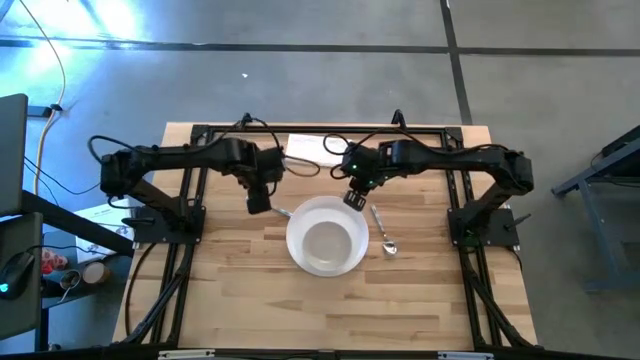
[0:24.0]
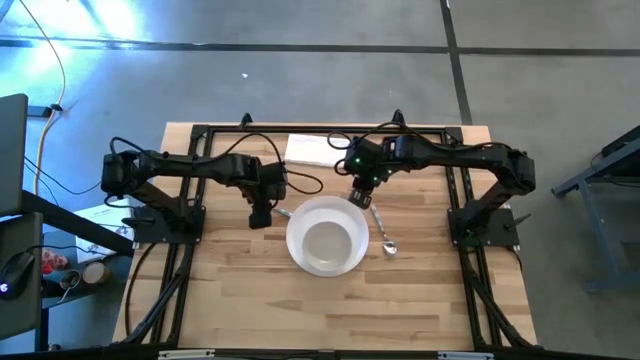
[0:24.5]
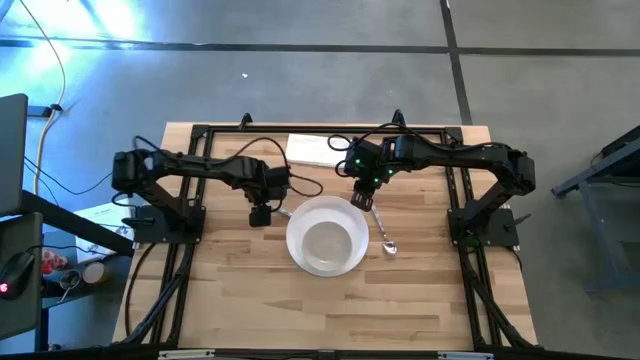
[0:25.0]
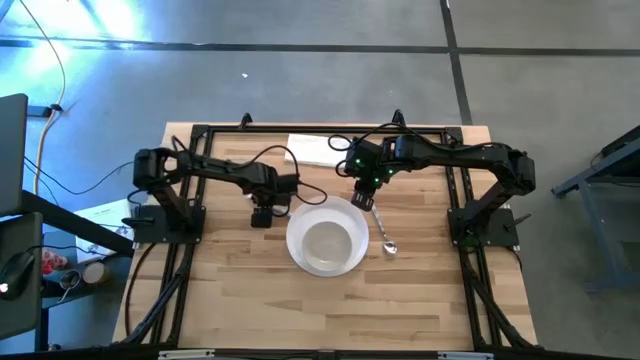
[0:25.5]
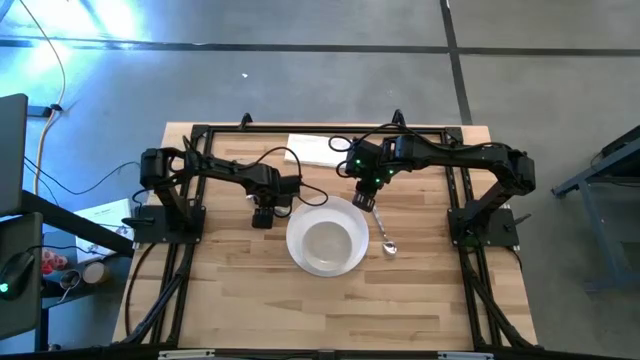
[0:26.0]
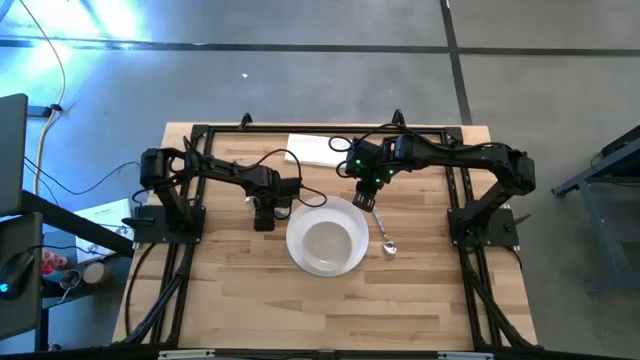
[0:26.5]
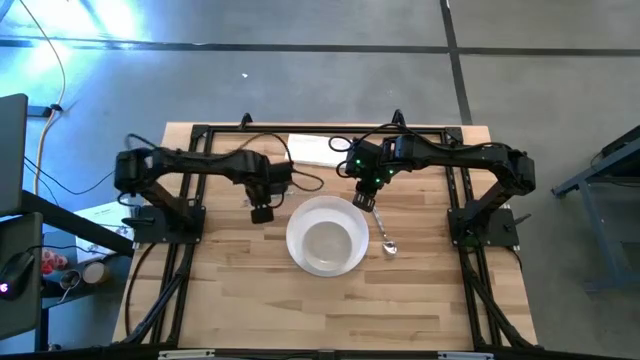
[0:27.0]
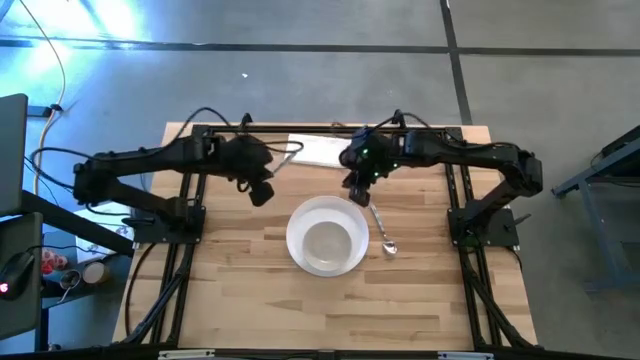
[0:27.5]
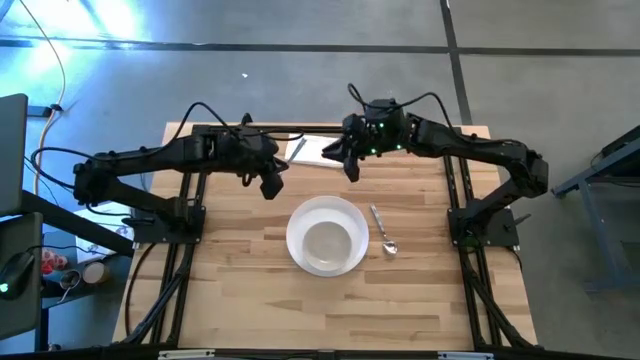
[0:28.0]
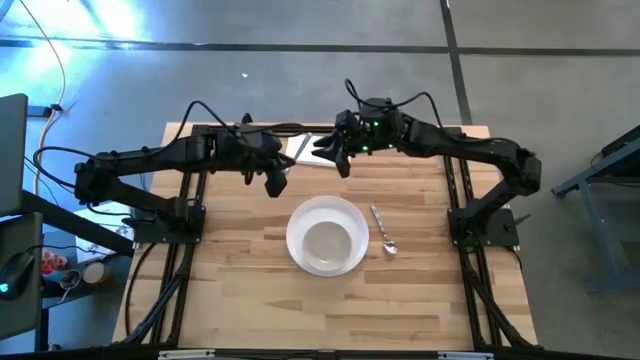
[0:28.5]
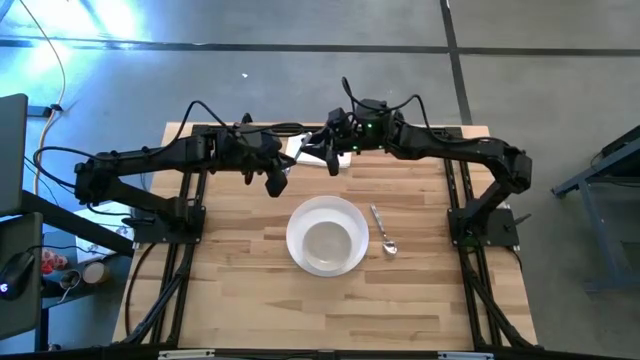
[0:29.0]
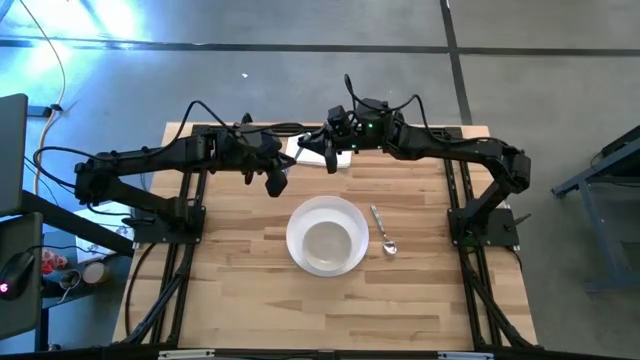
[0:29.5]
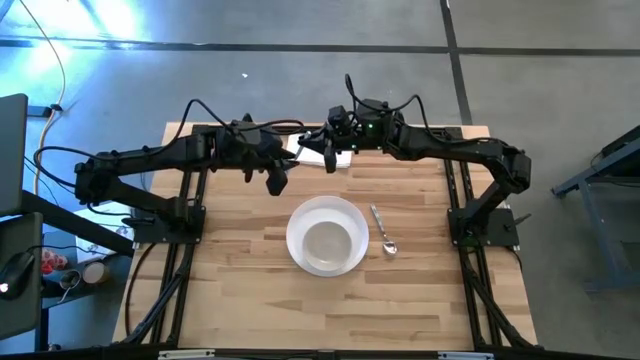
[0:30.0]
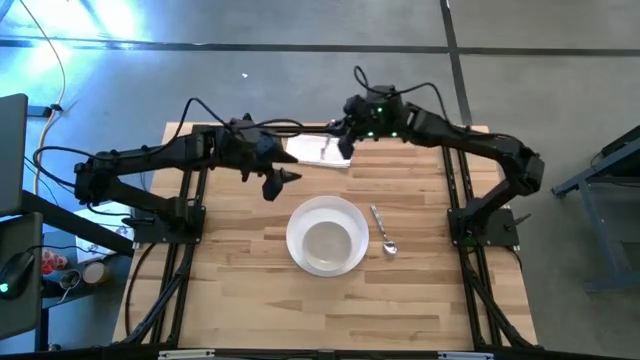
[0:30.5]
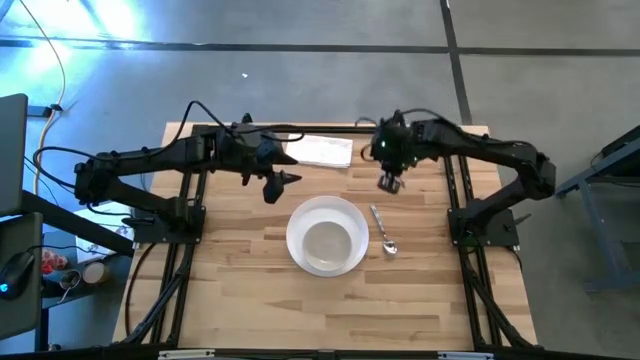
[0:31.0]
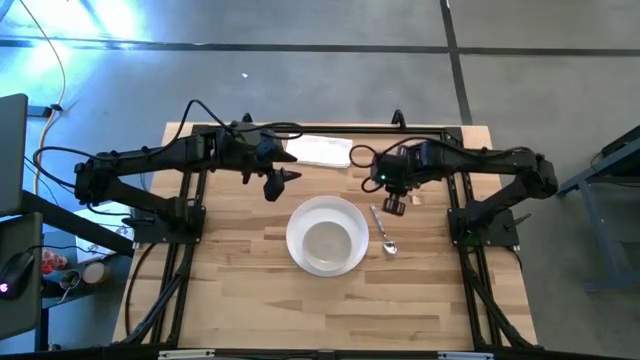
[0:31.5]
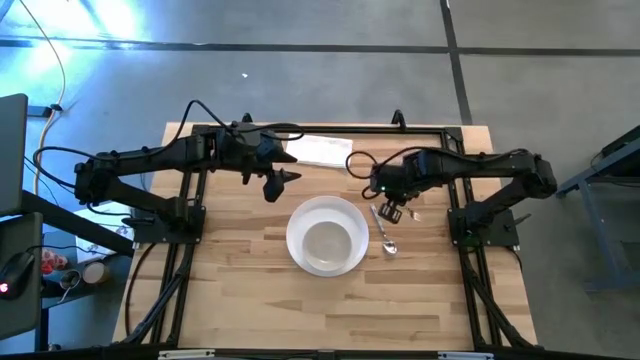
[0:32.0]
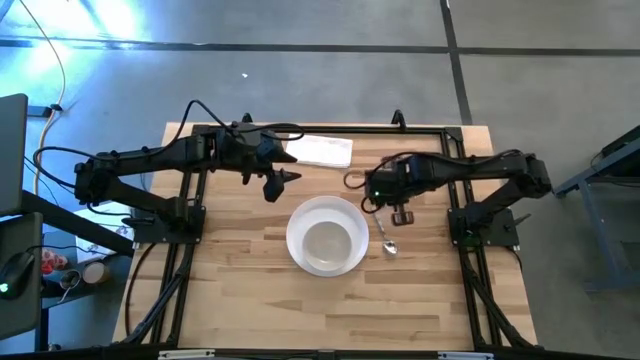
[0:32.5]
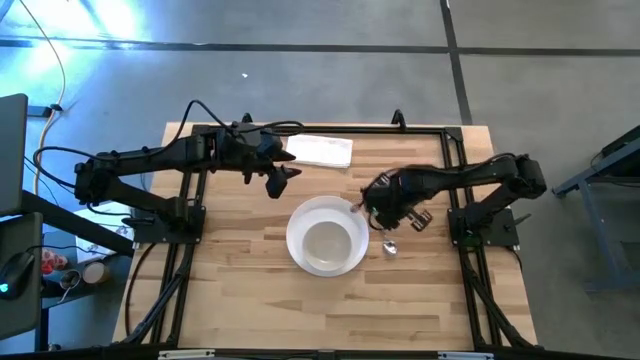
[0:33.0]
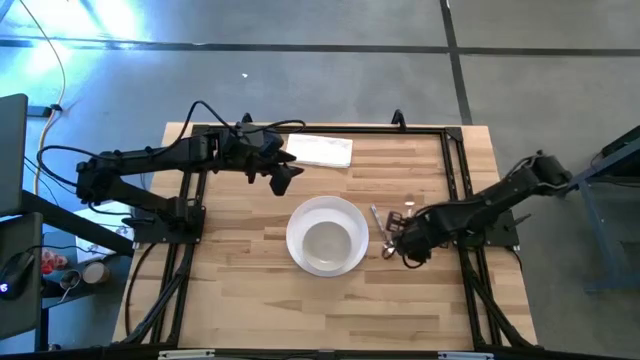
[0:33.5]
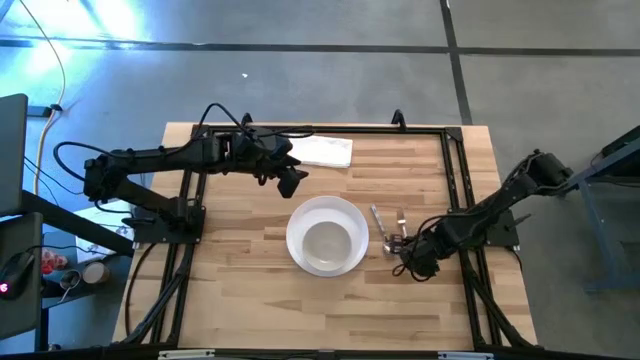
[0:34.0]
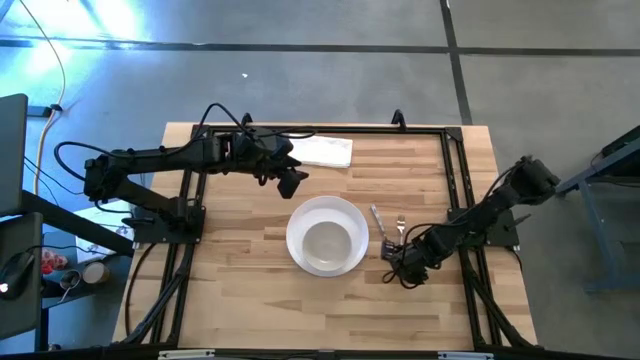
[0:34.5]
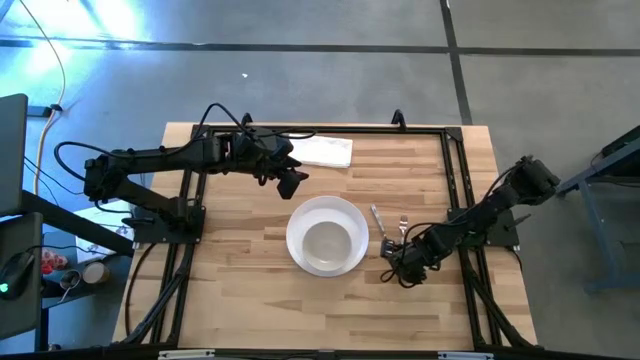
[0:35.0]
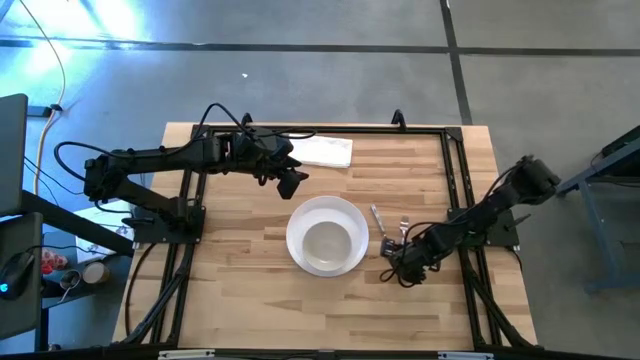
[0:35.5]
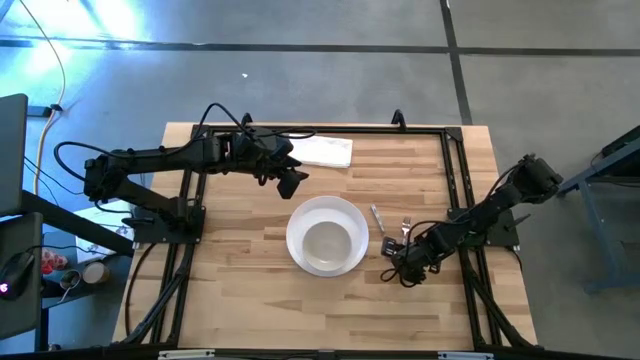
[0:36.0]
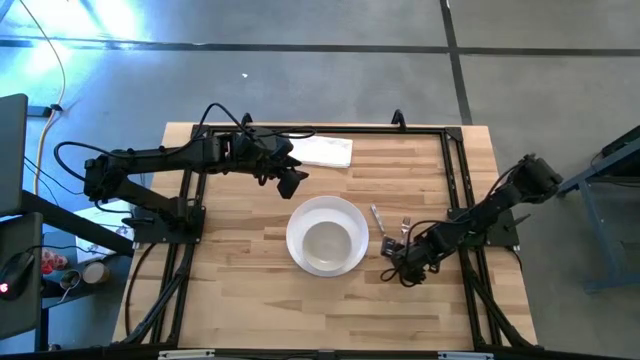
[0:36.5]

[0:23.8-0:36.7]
Task: Set table place
Put the blue fork to the right of the blue spoon

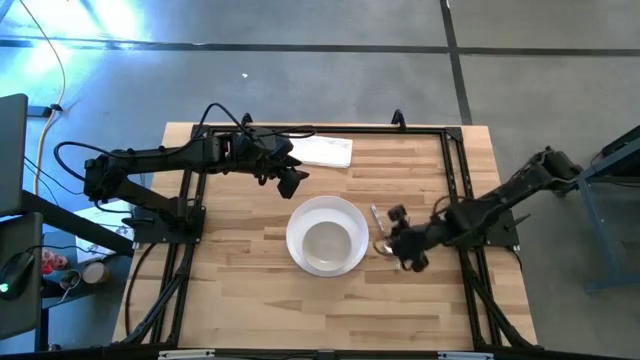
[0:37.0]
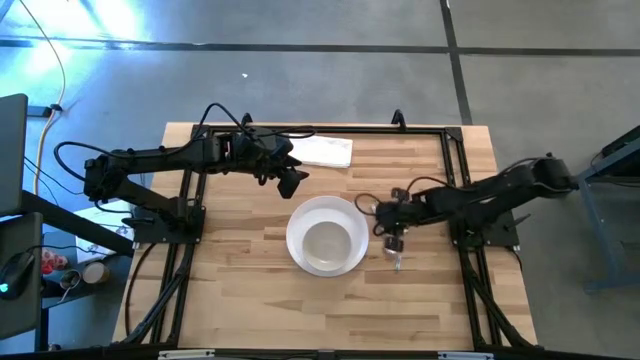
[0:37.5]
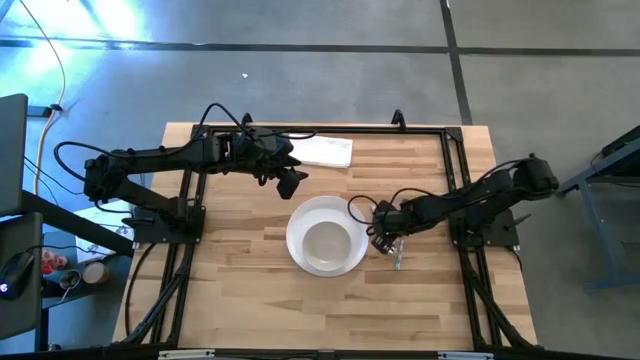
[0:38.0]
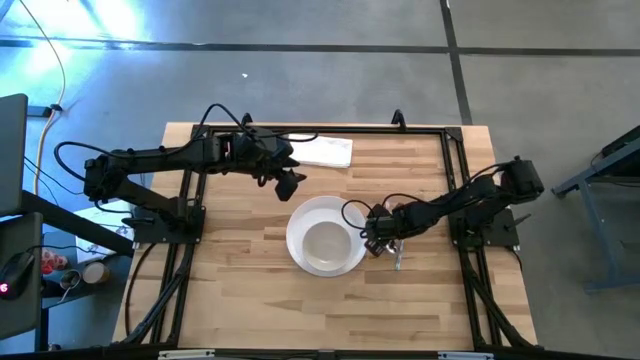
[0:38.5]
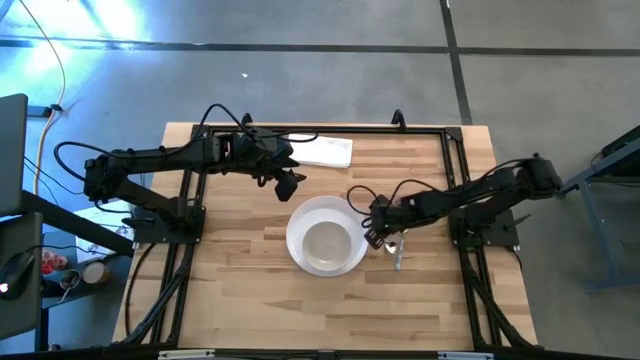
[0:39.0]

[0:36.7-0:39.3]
Put the blue spoon into the white bowl

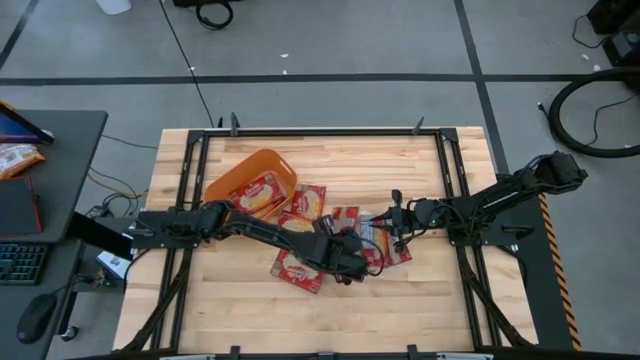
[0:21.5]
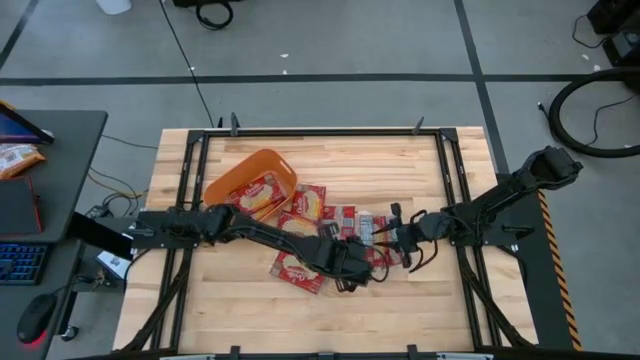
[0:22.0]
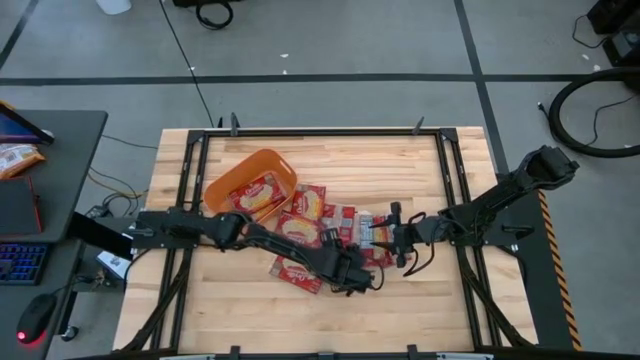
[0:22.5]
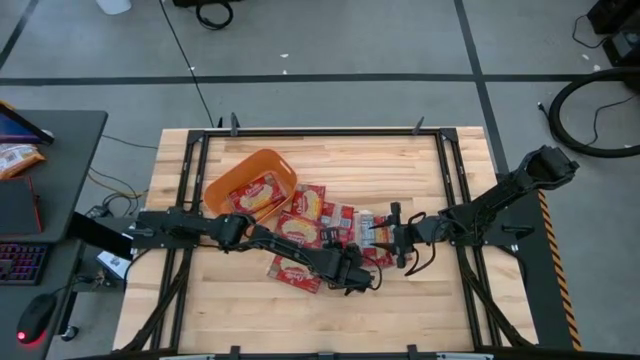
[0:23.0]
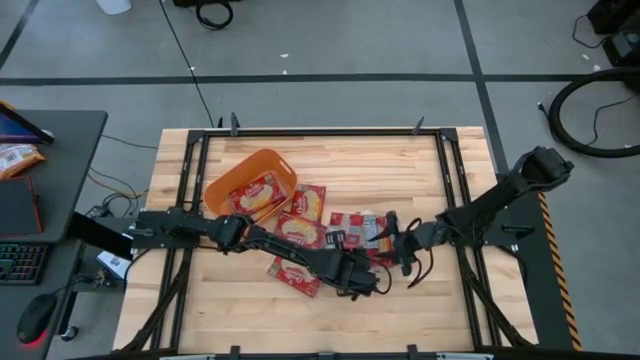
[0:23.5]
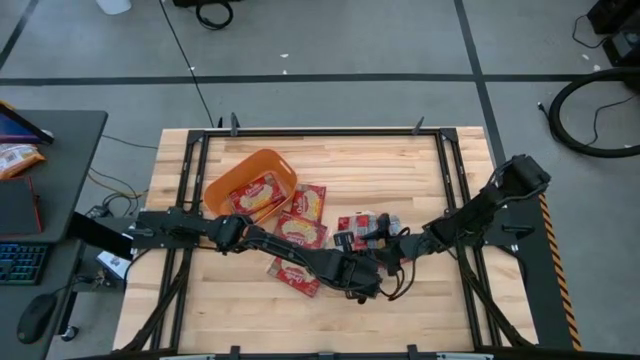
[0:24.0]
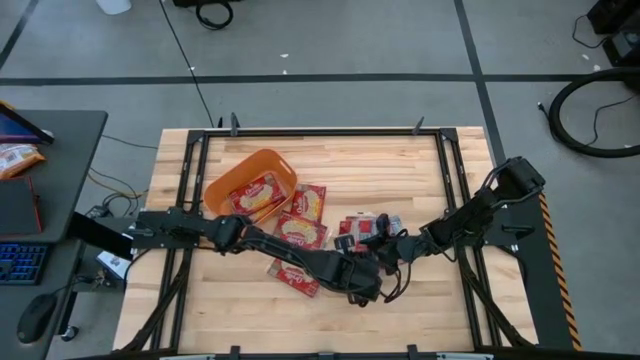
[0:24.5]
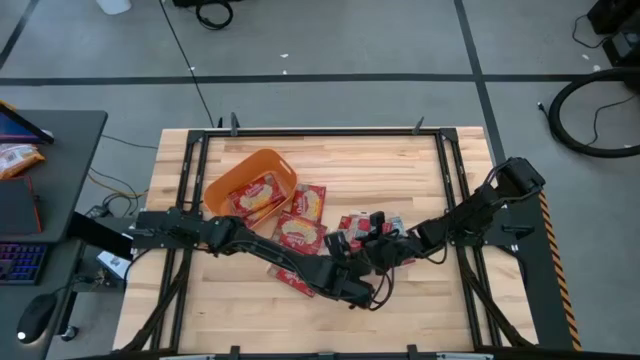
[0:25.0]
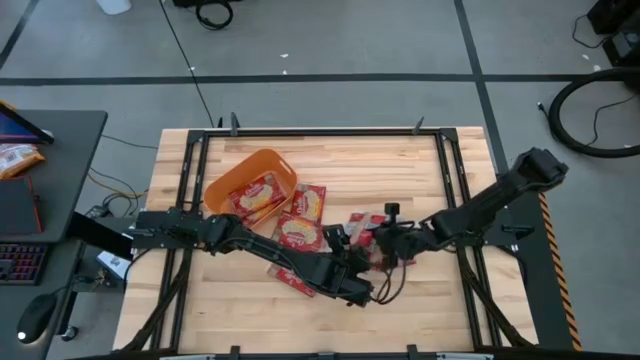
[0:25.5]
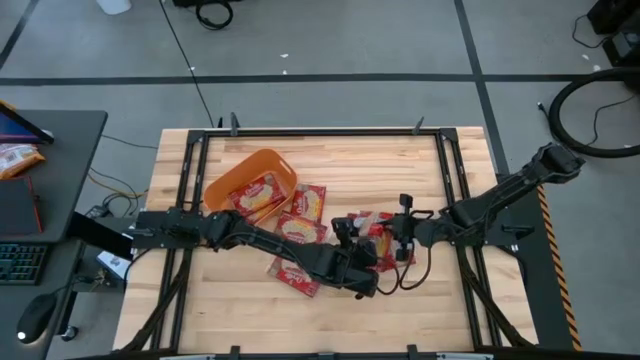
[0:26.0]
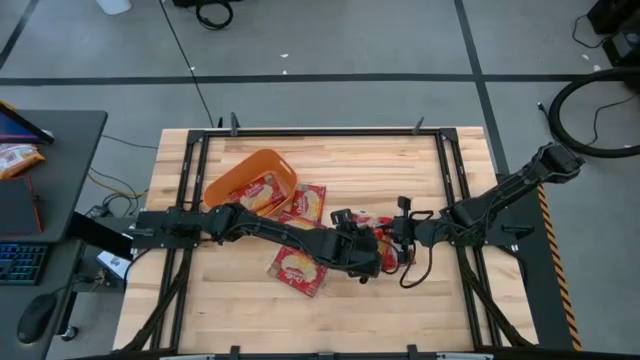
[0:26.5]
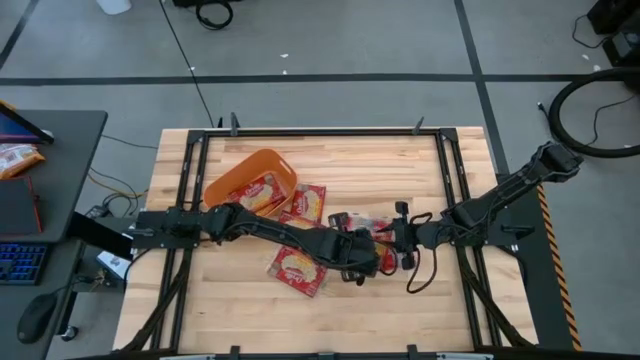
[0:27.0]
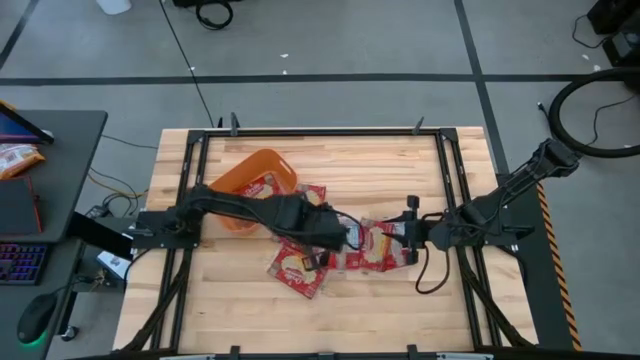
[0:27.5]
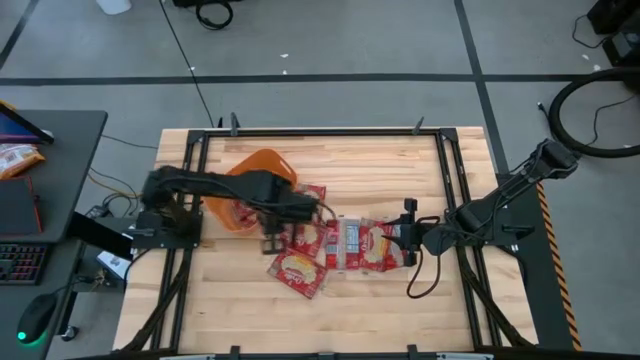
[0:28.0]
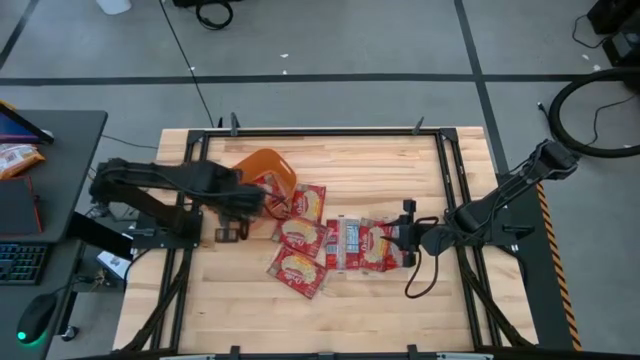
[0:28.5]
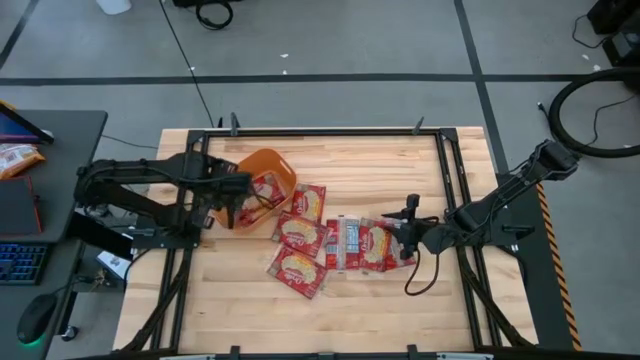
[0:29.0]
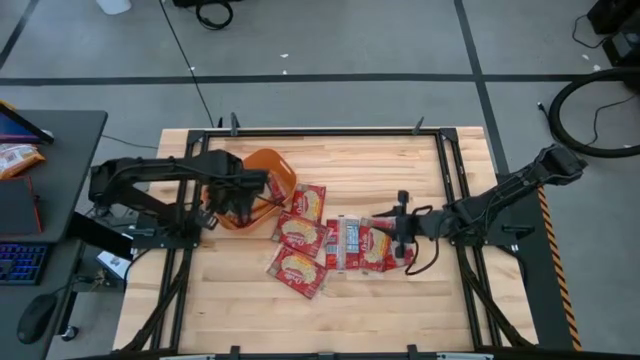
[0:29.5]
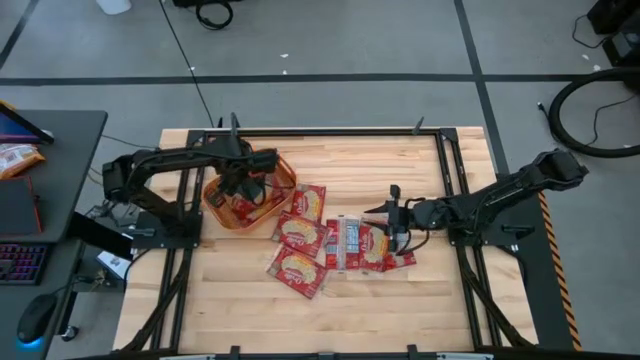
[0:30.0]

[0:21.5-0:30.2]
Task: Sort popcorn bags into baskets
Put the red popcorn bag into the orange bin
